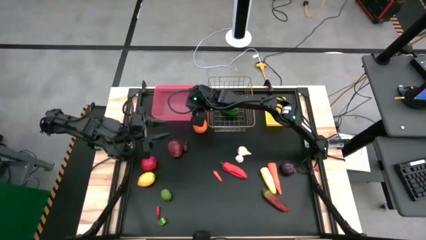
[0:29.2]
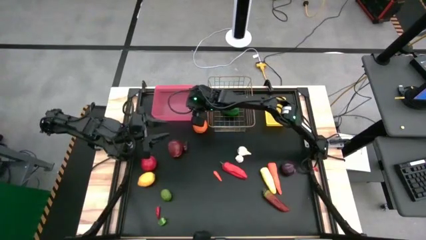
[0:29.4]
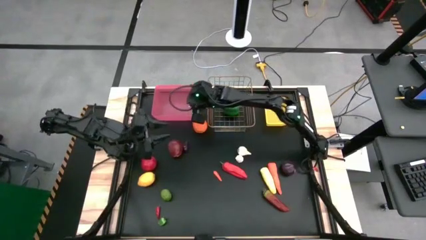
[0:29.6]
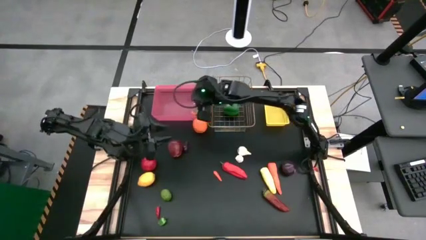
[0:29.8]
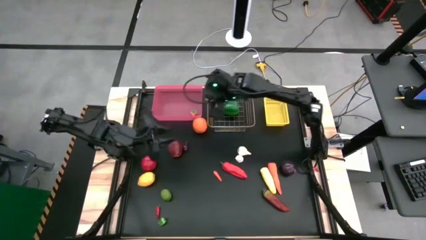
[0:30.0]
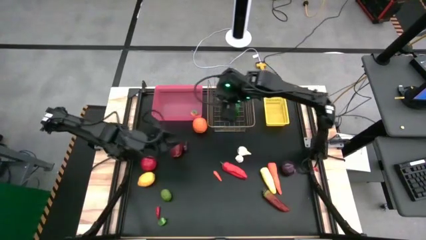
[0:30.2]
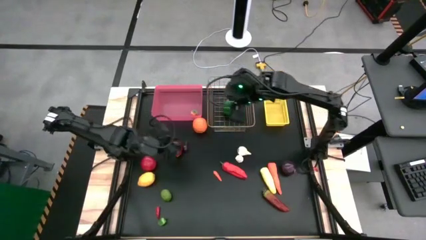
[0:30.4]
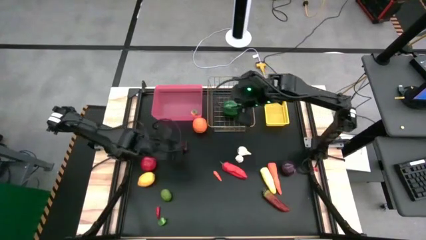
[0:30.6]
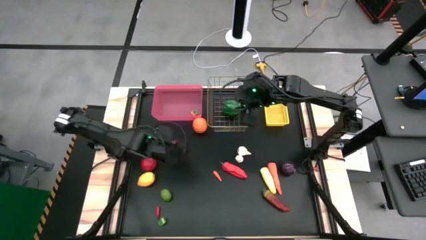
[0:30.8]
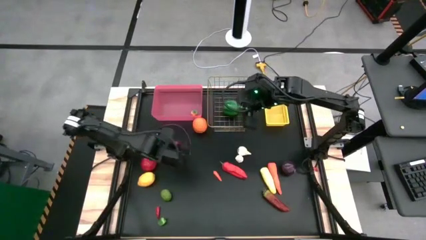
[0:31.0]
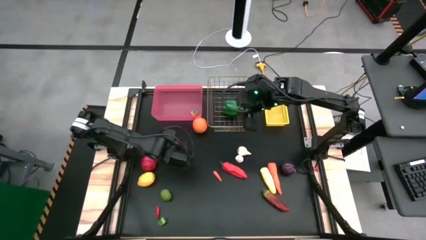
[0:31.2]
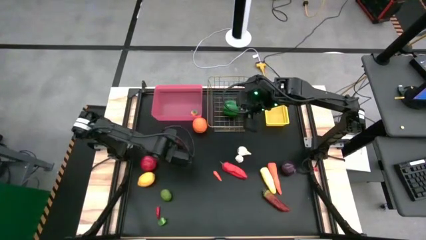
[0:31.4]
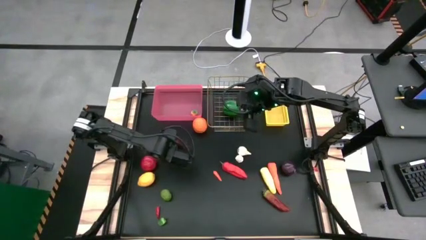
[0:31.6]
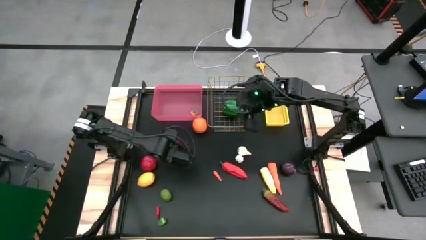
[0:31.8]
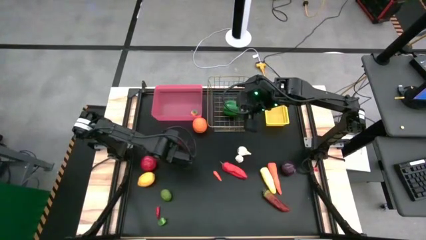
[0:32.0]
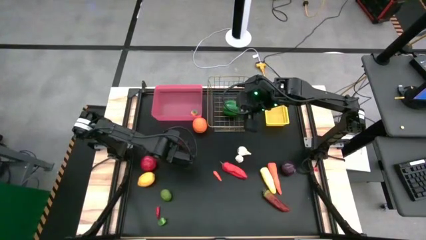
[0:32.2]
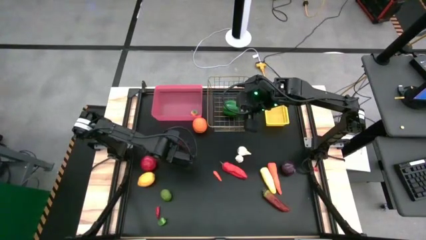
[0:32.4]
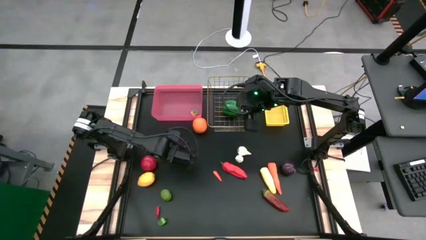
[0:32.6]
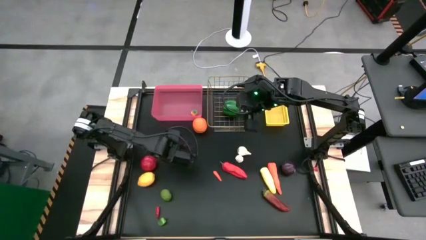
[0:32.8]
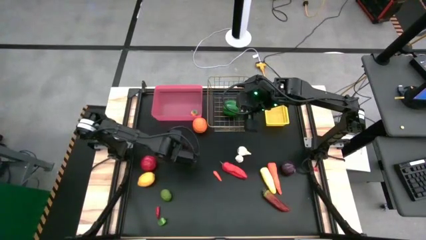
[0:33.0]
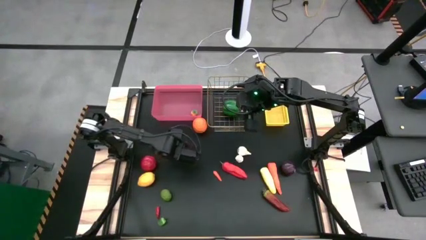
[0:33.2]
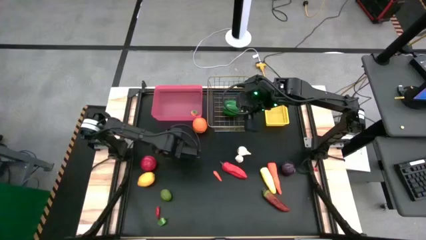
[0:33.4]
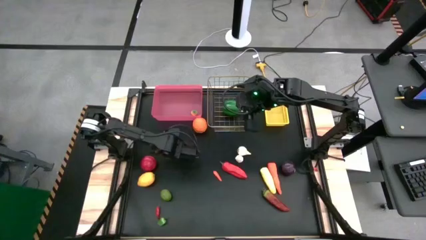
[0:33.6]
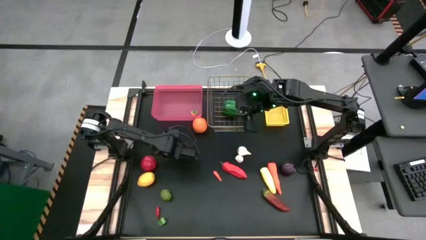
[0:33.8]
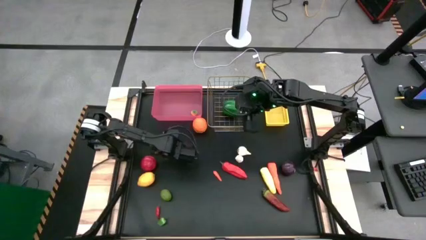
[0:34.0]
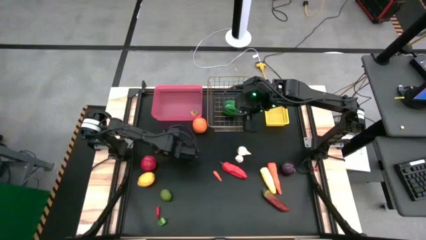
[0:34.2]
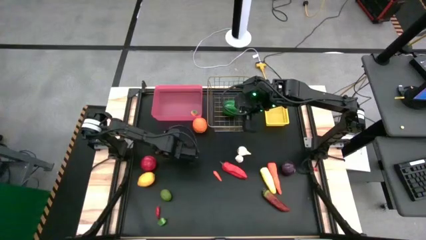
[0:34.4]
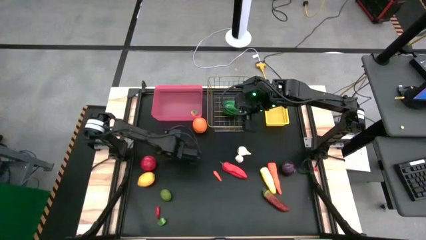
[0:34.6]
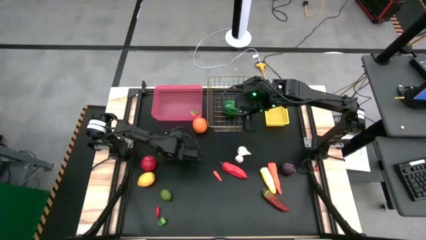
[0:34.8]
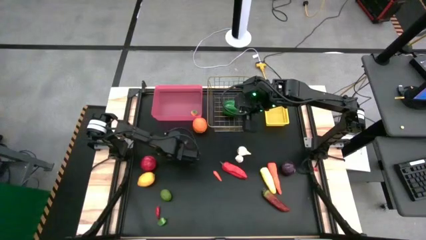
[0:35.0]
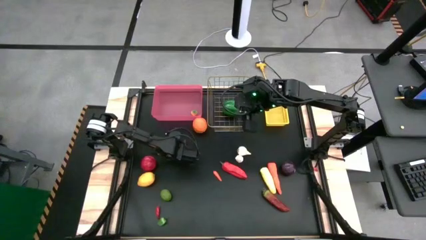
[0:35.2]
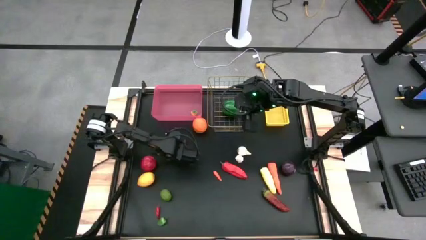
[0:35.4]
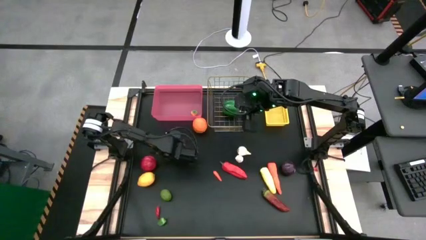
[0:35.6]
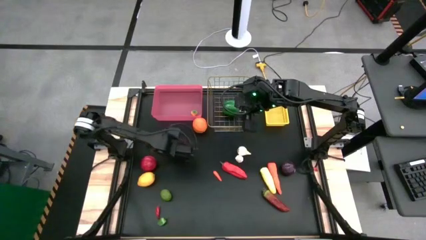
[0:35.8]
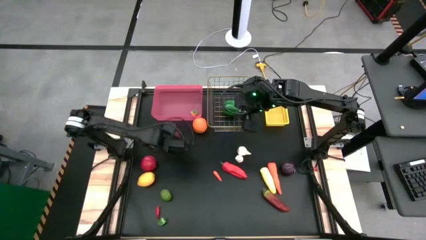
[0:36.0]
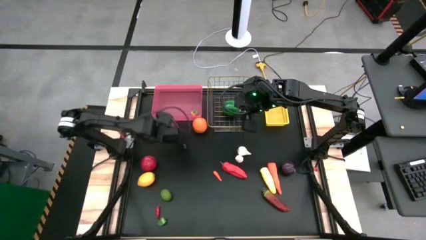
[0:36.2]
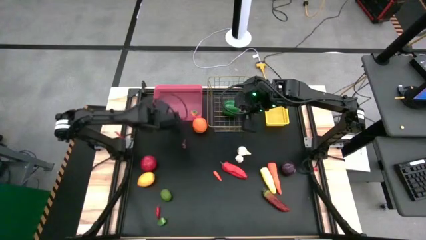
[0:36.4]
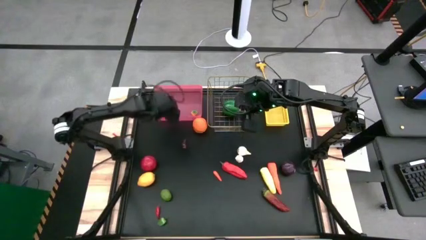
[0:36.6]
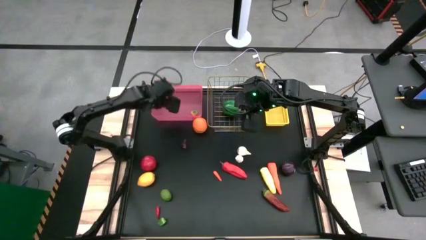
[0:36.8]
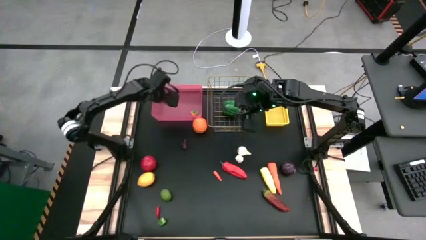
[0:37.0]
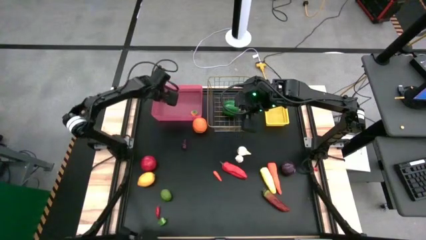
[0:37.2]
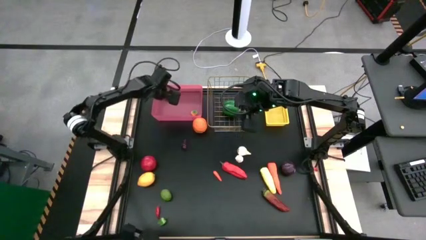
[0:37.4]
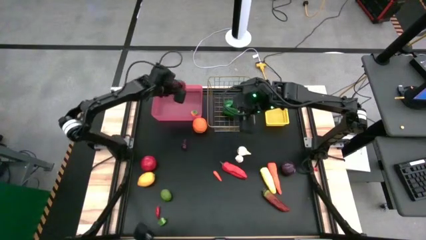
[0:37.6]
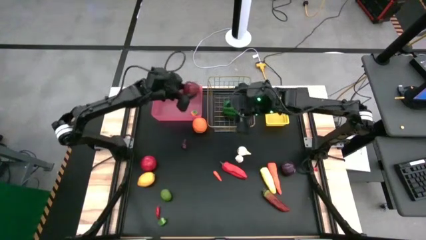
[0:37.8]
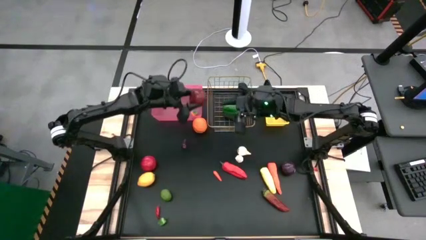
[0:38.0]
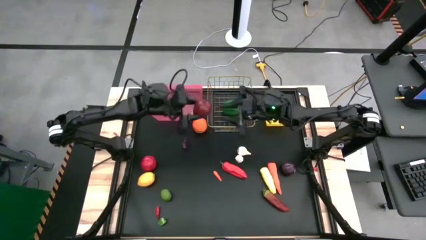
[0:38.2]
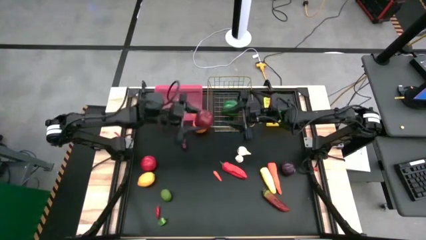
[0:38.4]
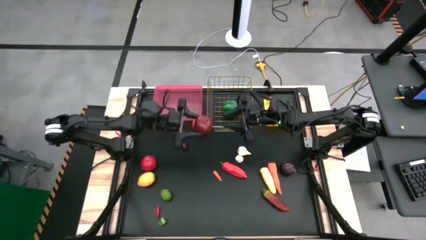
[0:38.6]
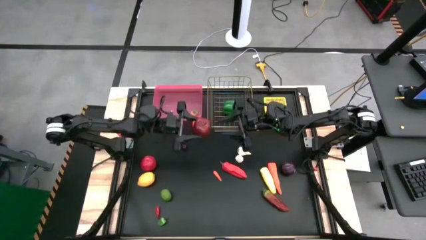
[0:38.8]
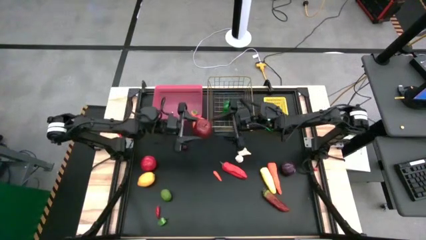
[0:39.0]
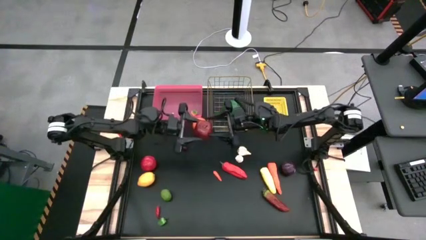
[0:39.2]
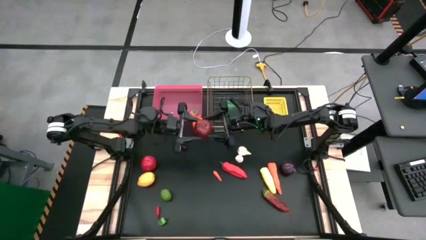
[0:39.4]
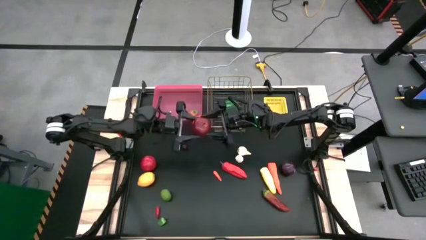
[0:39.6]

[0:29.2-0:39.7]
Task: Sort produce into baskets
Put the red apple into the red bin
